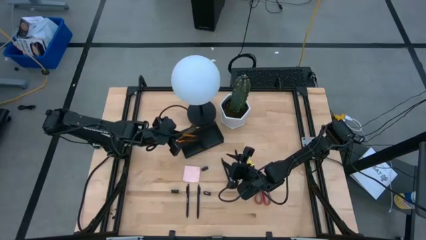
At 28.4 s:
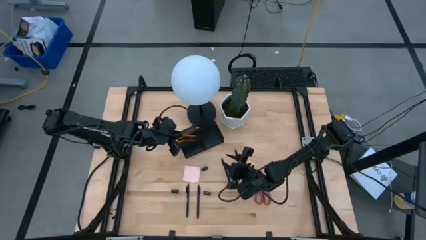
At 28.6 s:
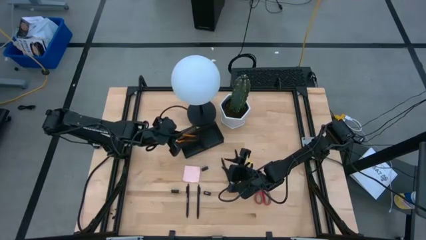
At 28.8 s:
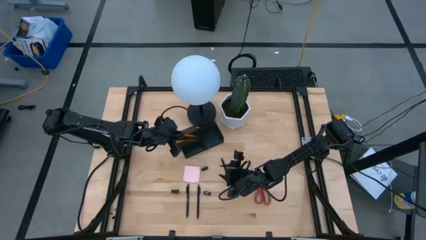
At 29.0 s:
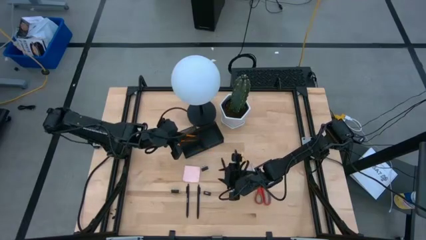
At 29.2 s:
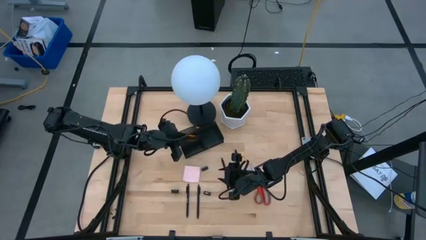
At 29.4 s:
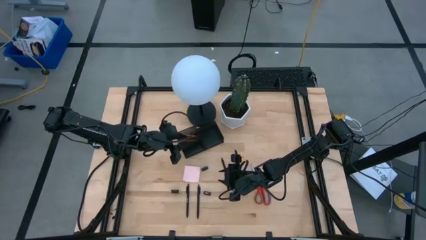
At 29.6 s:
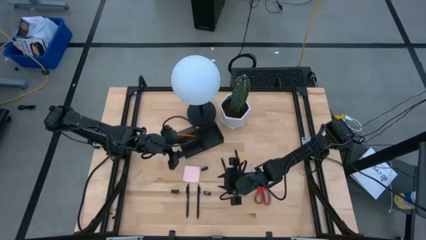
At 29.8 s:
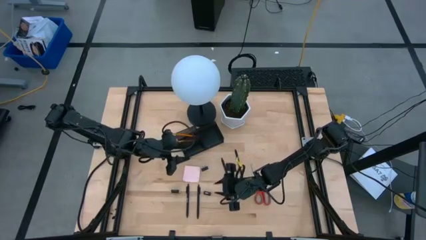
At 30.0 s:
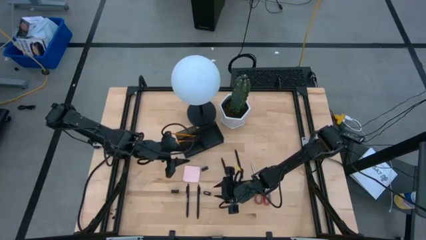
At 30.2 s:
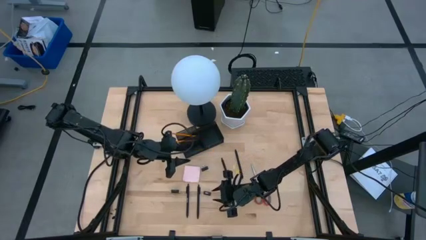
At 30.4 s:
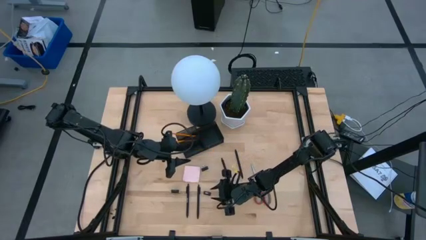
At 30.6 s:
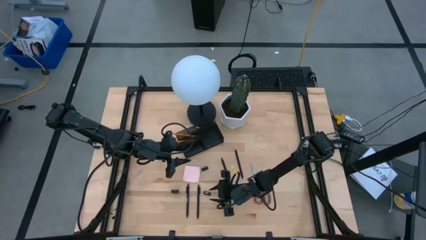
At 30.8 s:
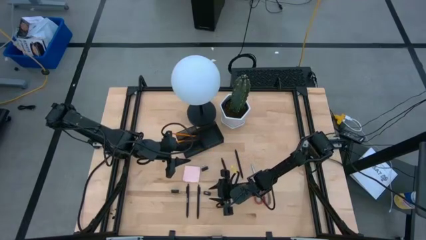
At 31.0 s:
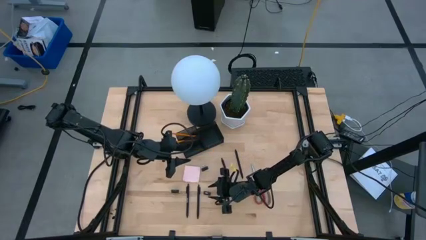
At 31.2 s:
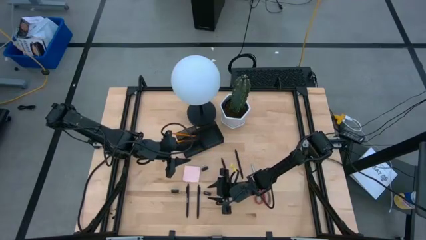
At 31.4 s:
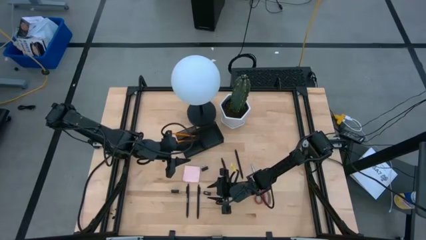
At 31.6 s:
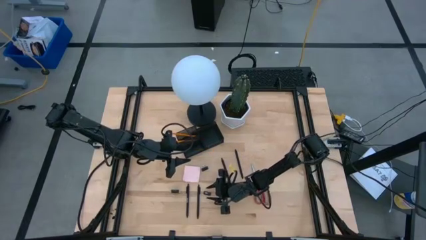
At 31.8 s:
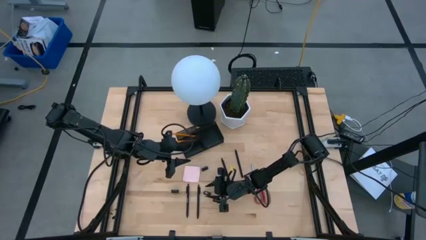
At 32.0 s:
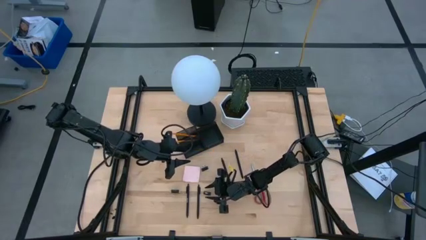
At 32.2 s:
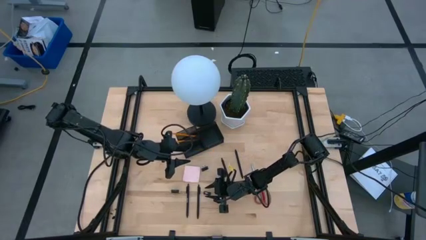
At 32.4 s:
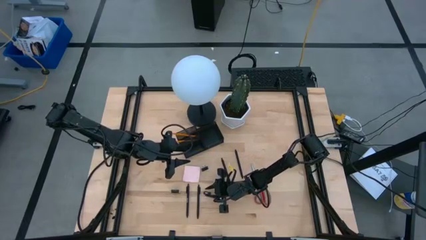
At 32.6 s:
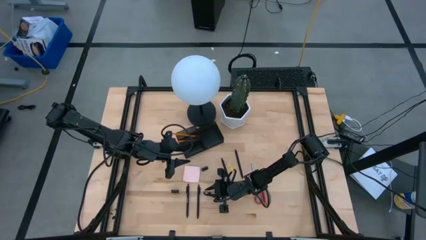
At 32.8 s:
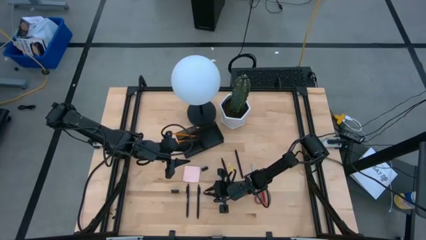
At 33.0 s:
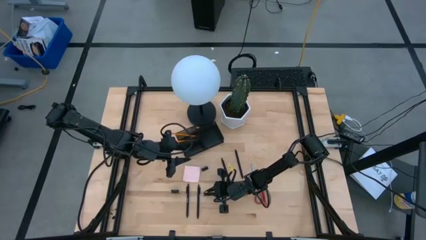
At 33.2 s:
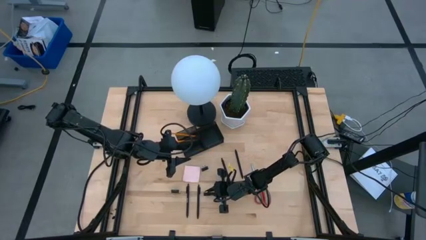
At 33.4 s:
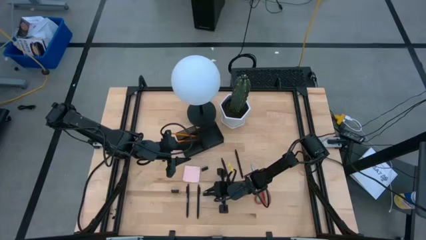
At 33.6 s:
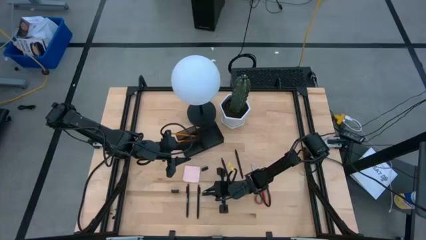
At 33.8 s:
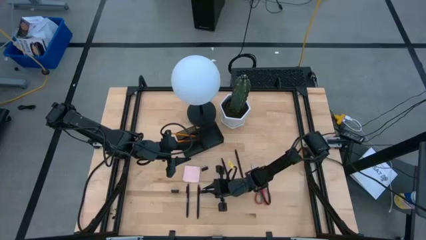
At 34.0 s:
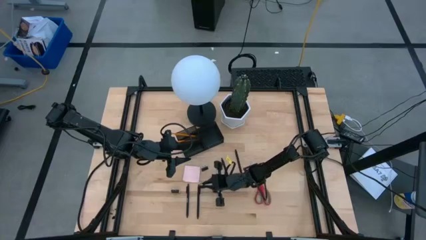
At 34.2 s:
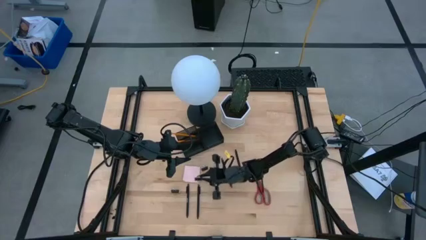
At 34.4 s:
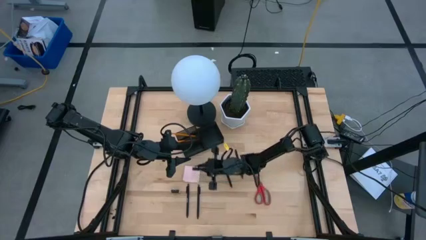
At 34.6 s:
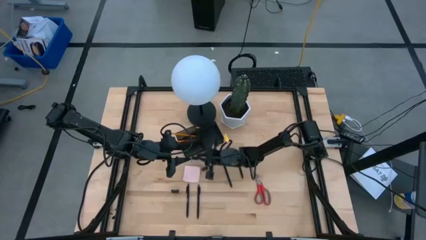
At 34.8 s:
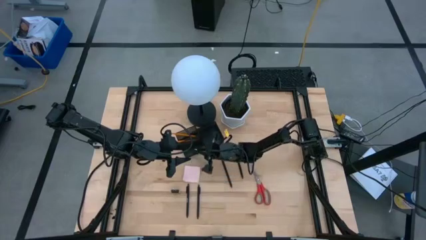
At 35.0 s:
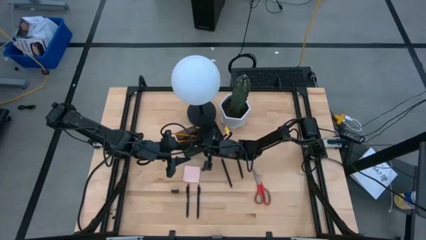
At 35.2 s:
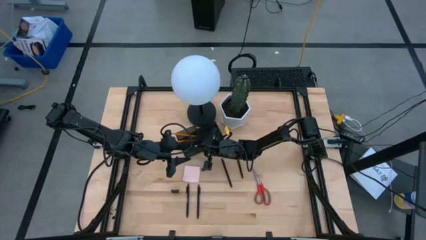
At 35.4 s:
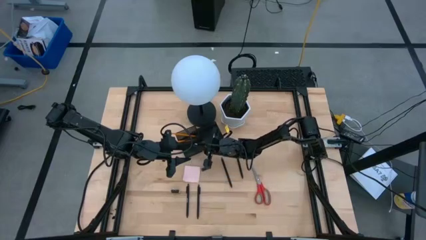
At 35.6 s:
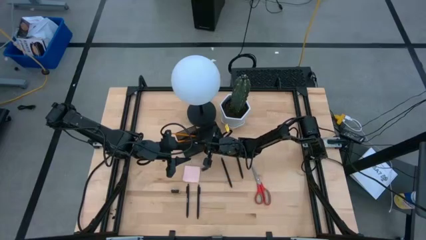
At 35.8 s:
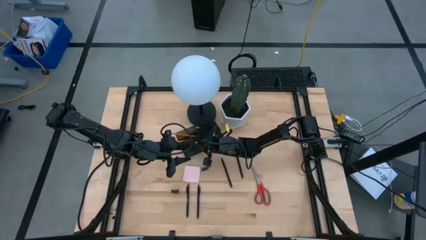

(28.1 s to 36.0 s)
Task: Pick and place office supplies into organizer
Put the bottom right black binder clip into the desk organizer

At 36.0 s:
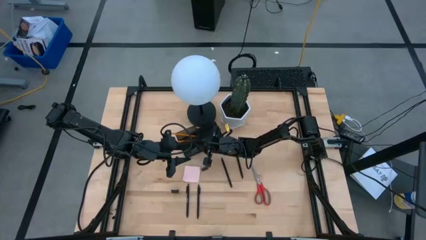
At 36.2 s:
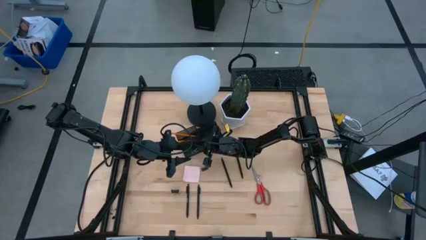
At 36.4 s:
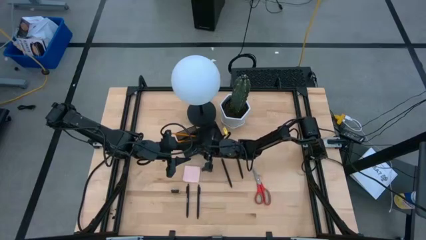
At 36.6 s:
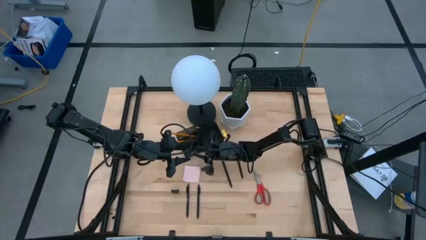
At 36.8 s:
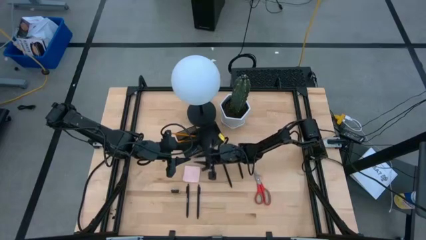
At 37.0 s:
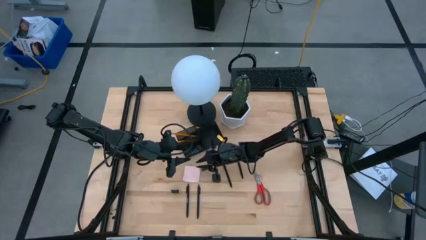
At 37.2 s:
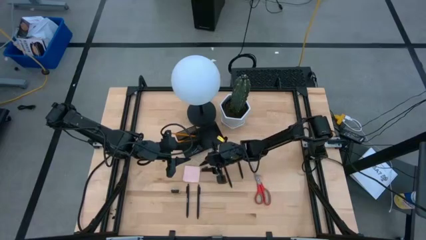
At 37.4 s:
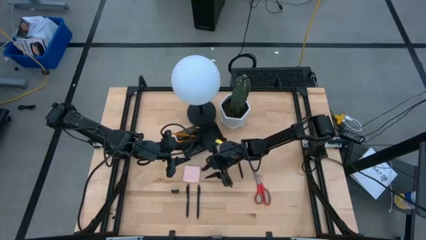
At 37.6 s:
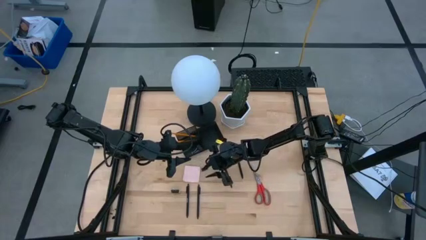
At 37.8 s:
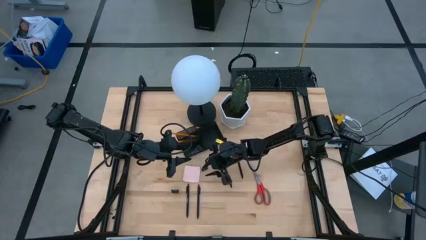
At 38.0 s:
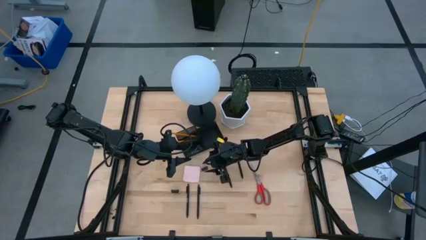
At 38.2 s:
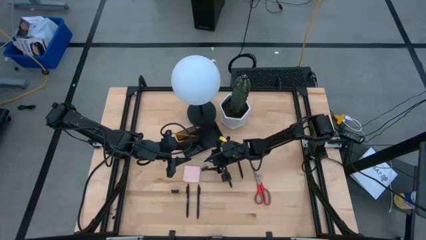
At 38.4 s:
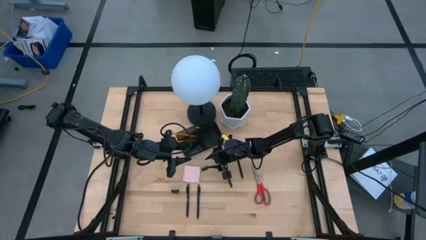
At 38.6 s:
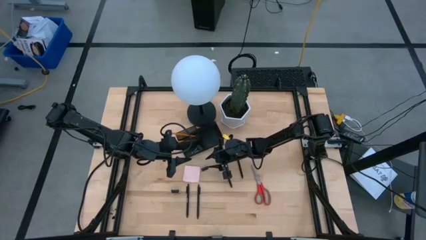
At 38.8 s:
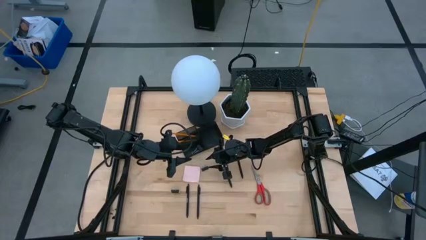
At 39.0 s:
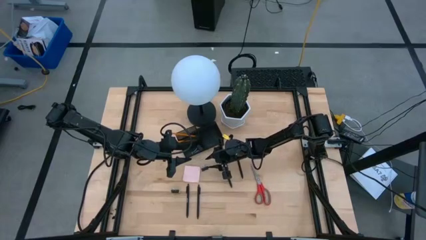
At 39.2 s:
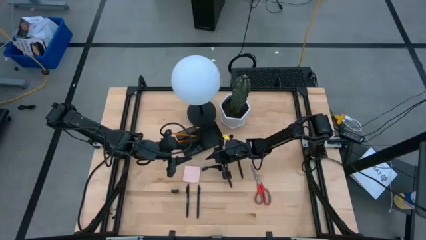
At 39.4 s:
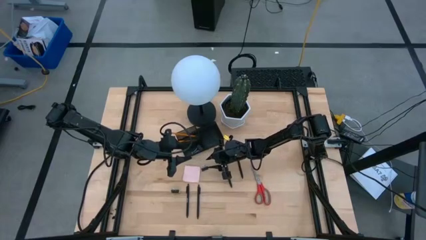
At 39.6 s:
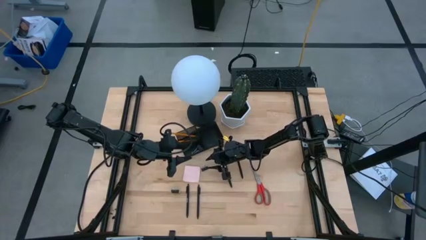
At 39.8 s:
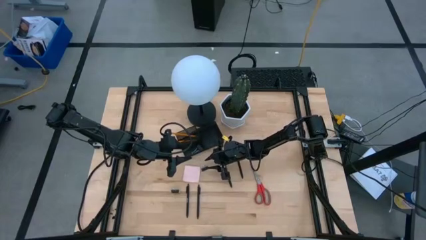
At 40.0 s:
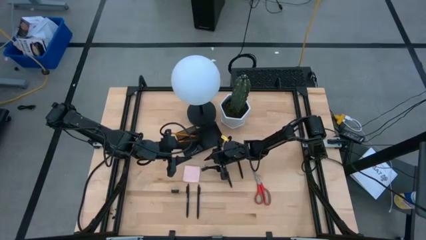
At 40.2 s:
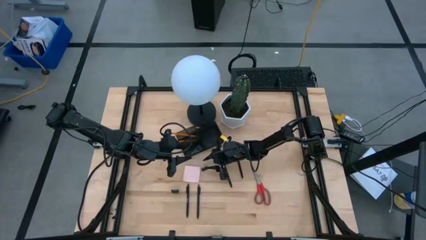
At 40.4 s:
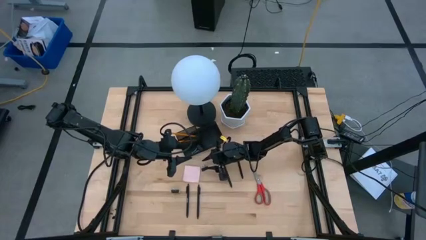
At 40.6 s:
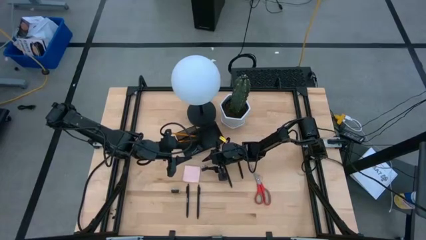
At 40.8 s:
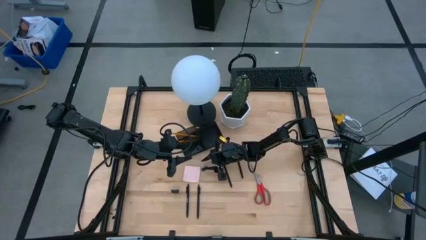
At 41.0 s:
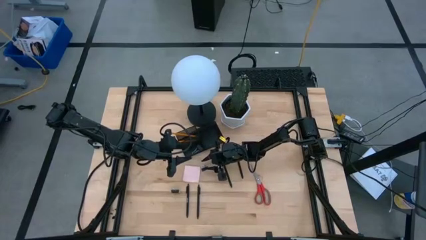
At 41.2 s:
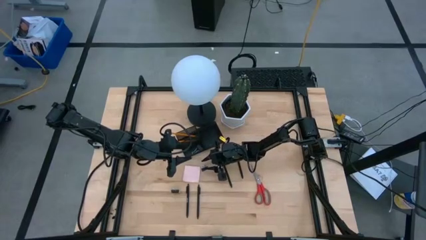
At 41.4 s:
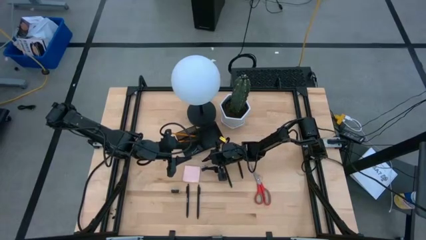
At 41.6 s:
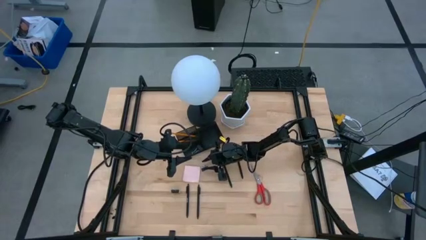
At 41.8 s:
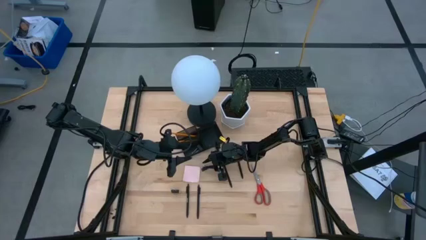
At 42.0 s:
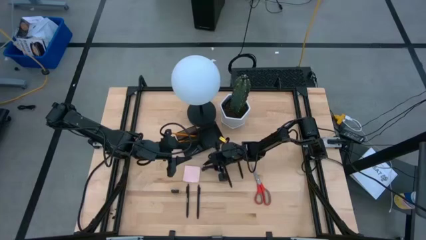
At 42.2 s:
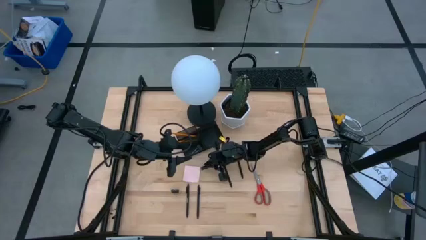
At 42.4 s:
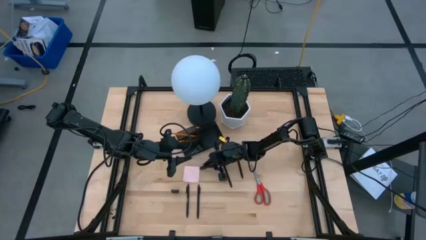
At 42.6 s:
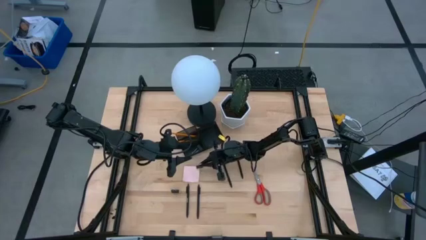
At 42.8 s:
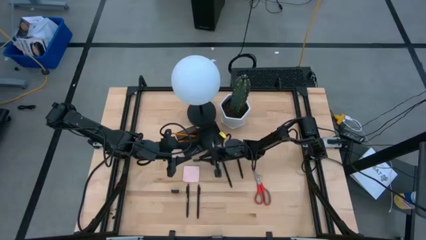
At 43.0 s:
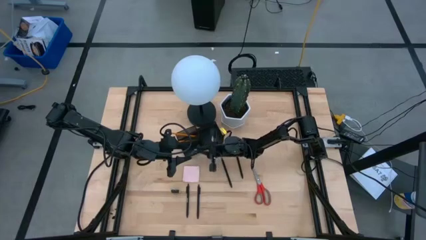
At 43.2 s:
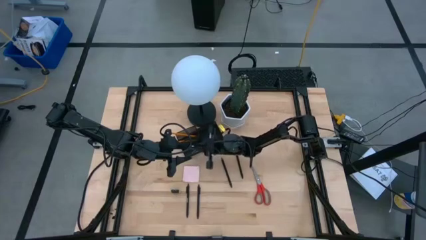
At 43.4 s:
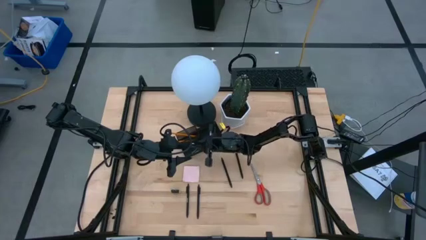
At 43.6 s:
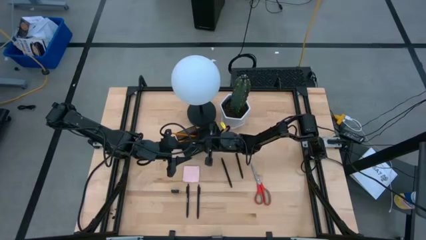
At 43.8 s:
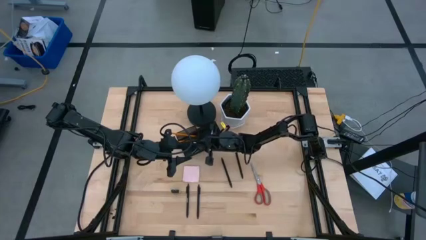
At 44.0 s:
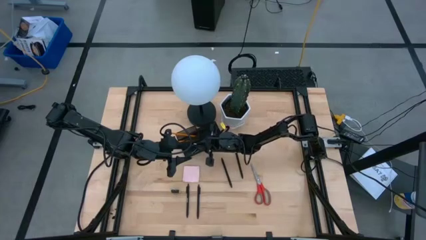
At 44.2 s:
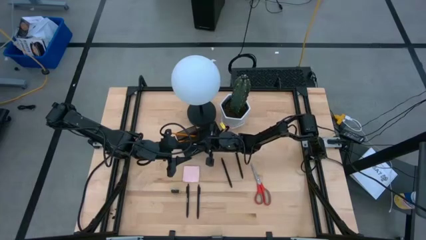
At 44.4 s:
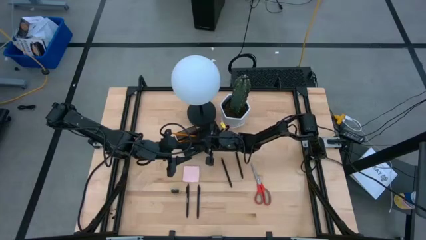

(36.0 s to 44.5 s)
Put the top black binder clip into the desk organizer
